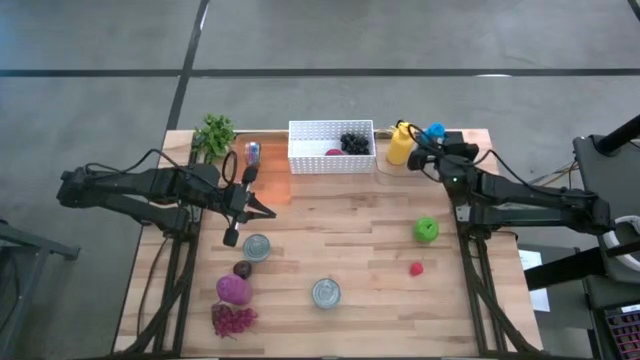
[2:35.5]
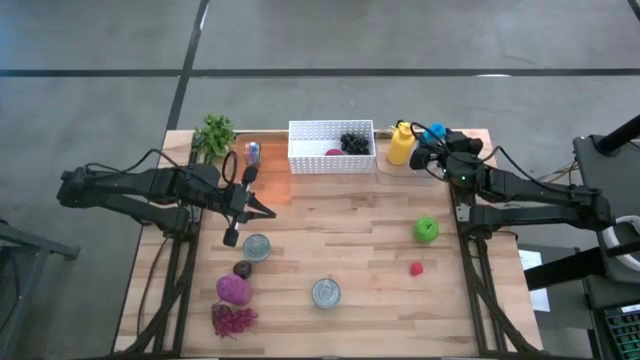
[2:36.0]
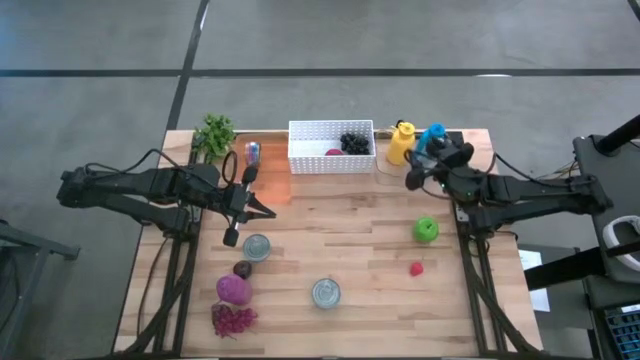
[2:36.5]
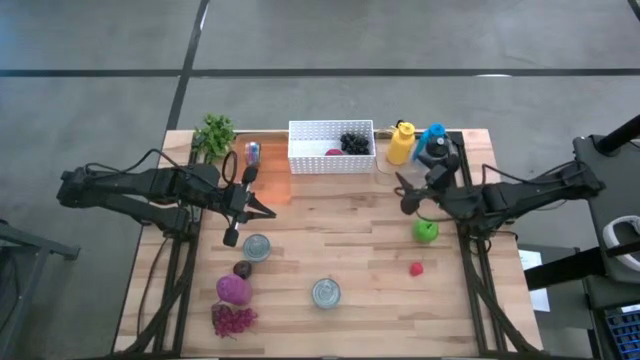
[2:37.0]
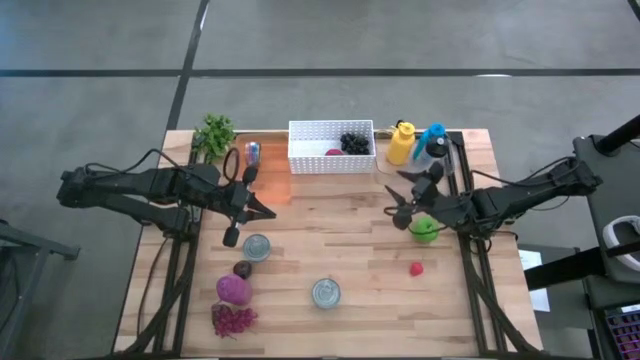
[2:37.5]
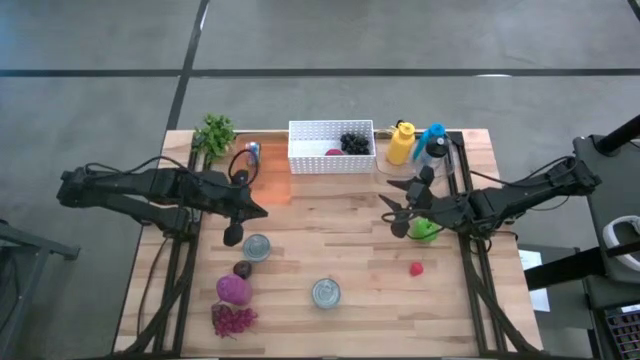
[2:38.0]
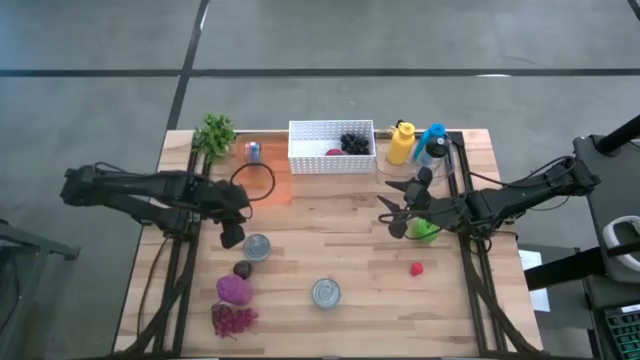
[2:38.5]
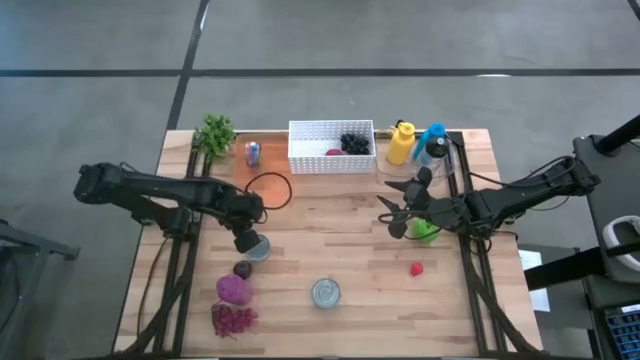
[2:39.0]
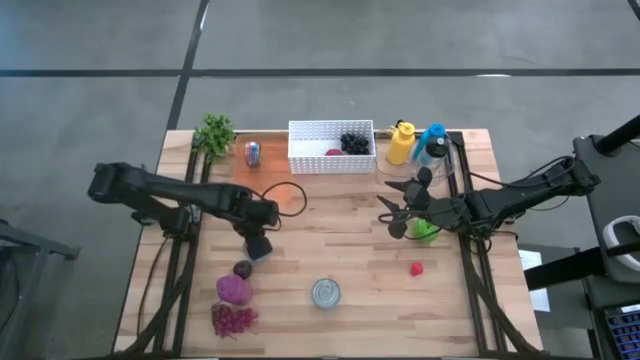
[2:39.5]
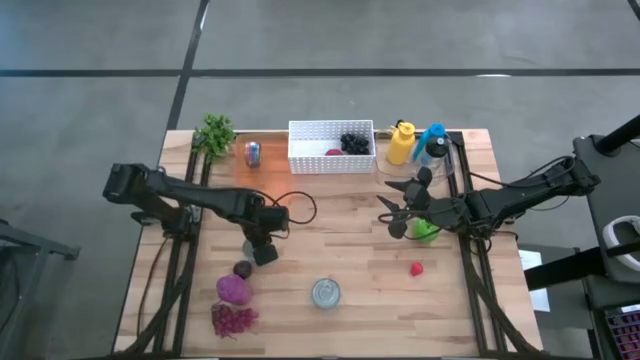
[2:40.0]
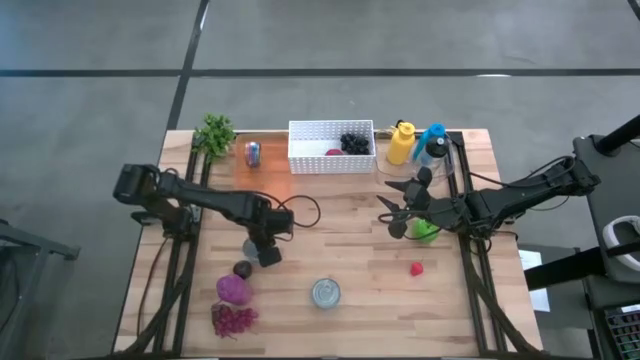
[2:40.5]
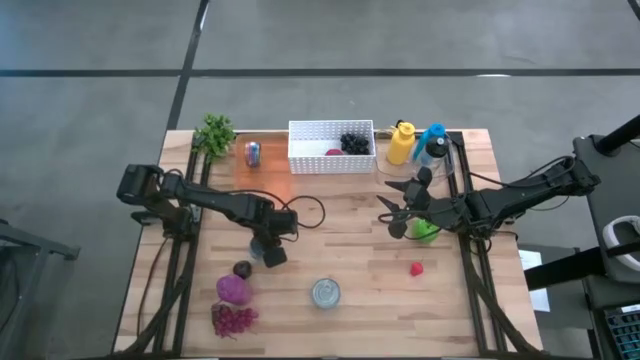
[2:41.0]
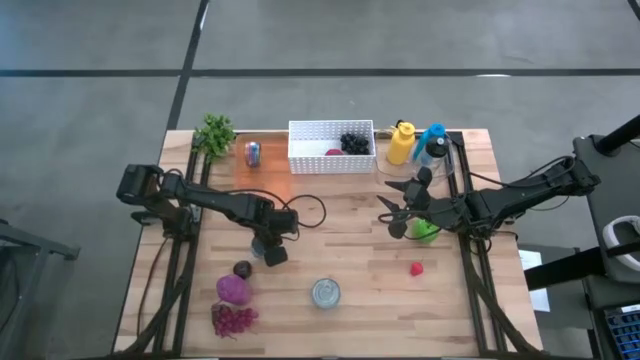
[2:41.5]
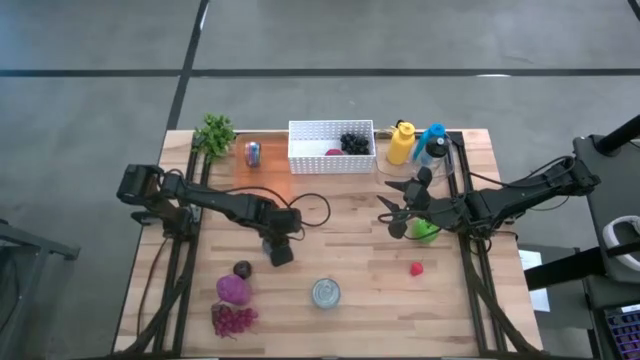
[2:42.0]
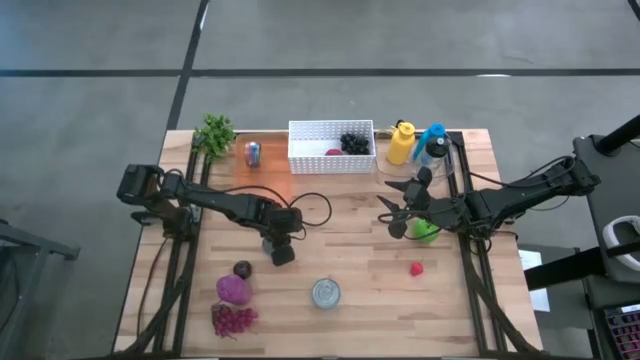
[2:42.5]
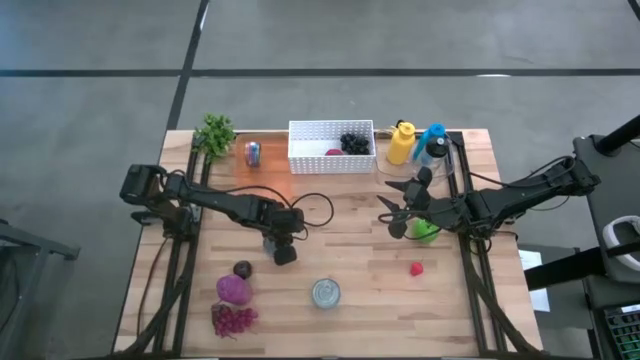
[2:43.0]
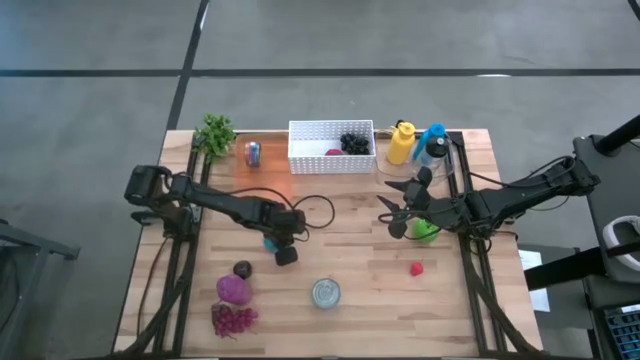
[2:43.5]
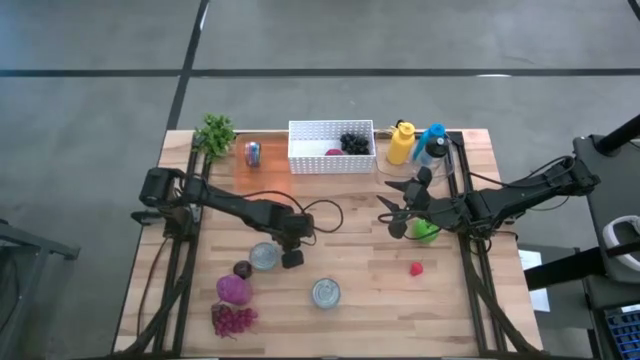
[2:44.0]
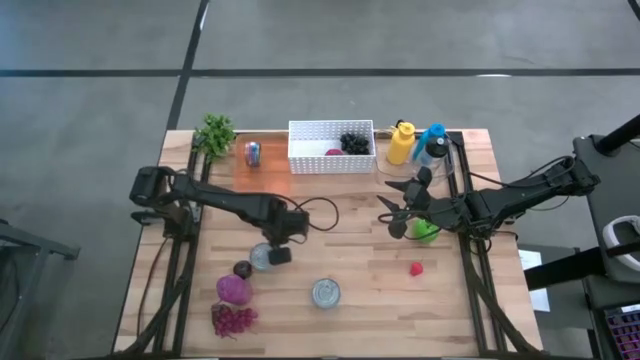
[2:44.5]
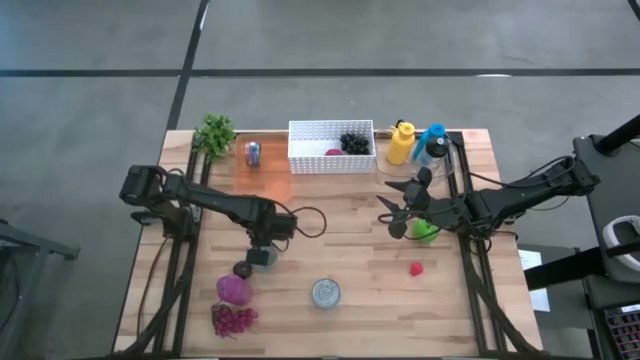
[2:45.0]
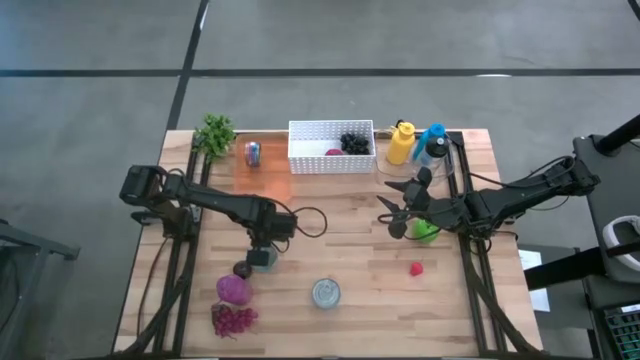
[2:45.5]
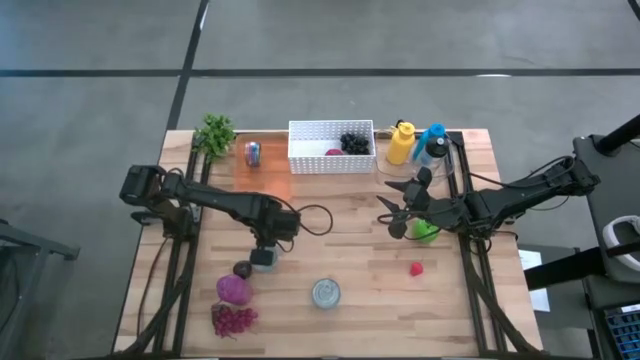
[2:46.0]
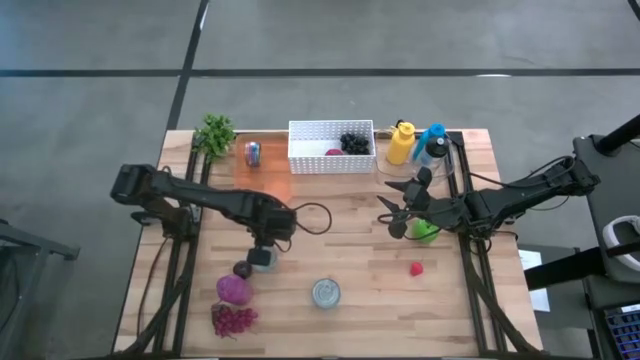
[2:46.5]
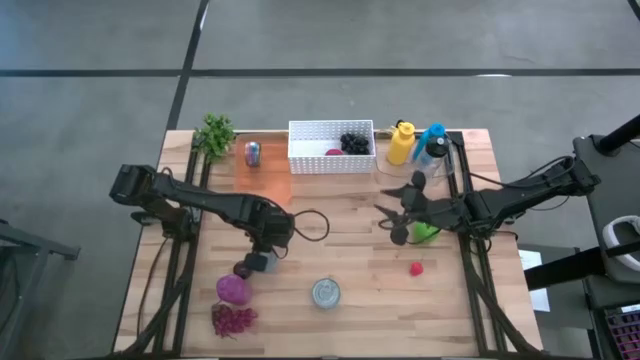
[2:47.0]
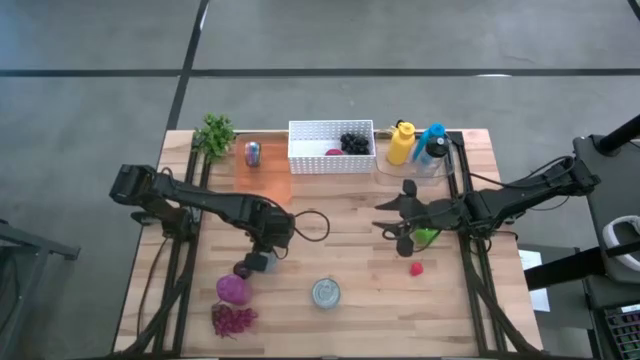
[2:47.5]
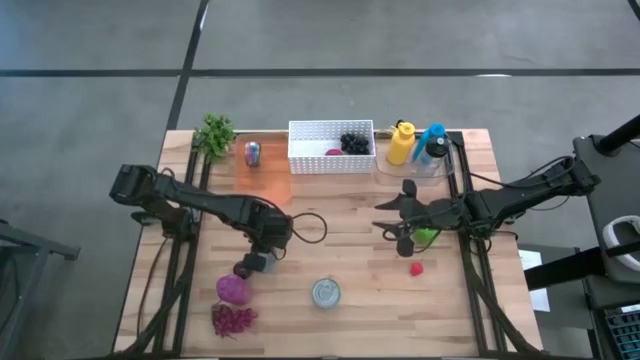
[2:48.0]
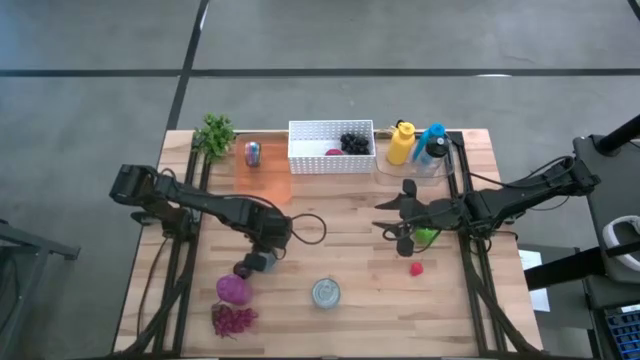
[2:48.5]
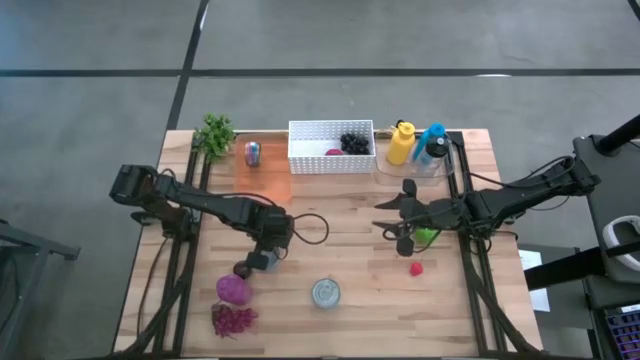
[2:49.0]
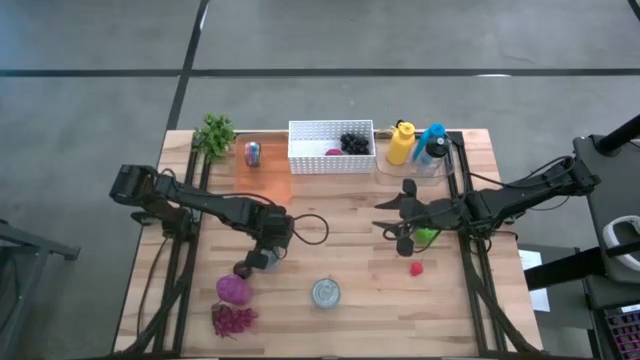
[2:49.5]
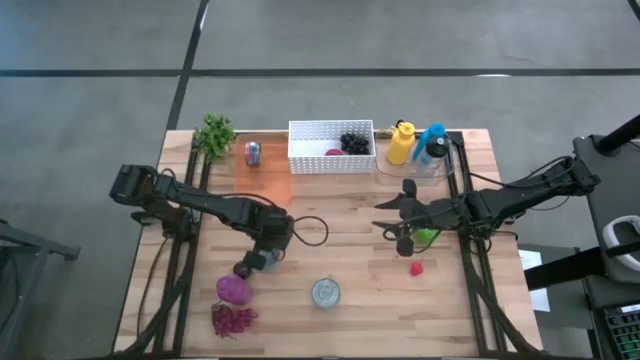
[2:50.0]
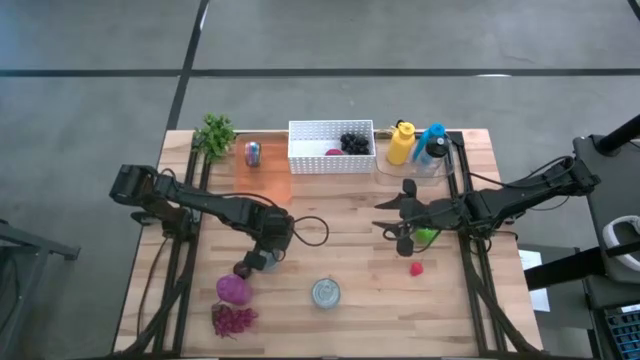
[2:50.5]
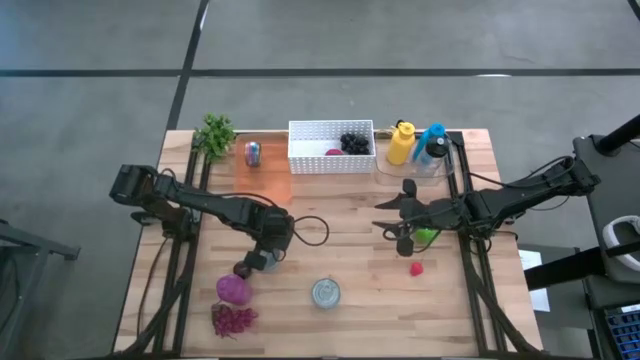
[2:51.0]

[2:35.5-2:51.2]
Task: Pick & Place Food Item
Put the yellow-blue tuna can into the orange bin

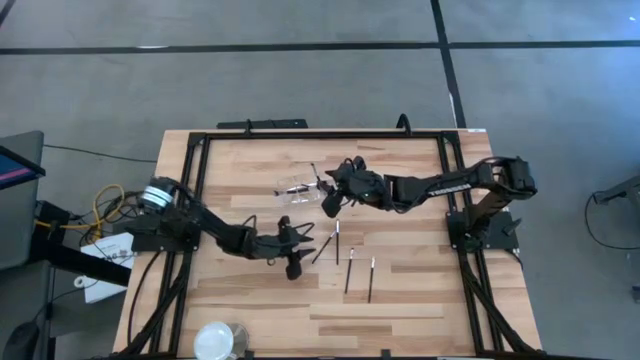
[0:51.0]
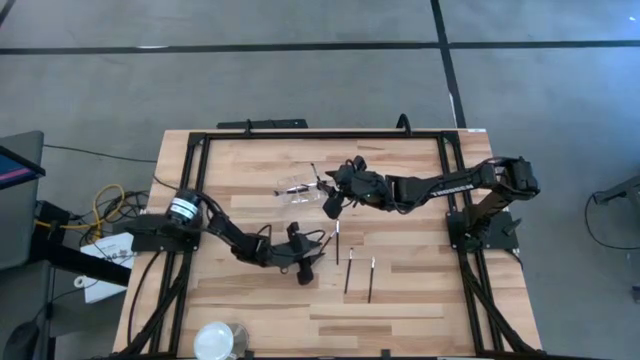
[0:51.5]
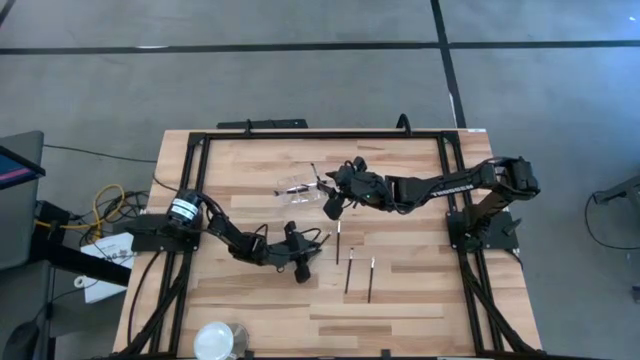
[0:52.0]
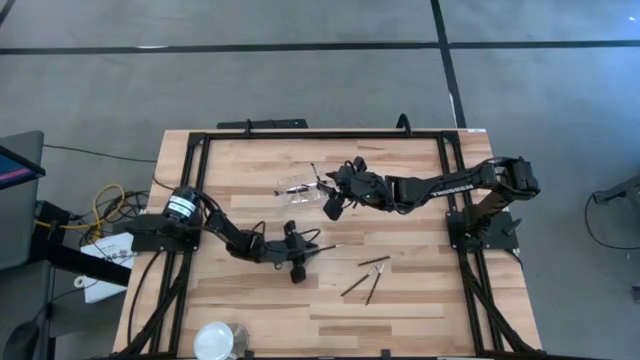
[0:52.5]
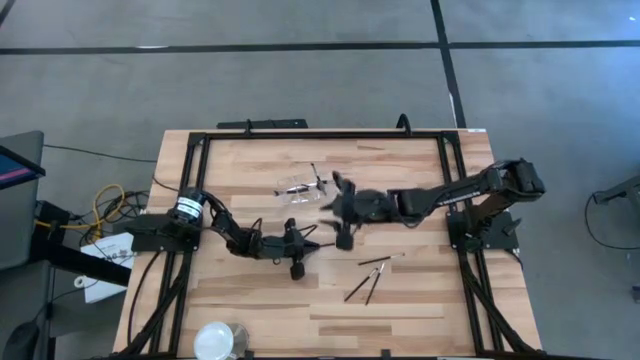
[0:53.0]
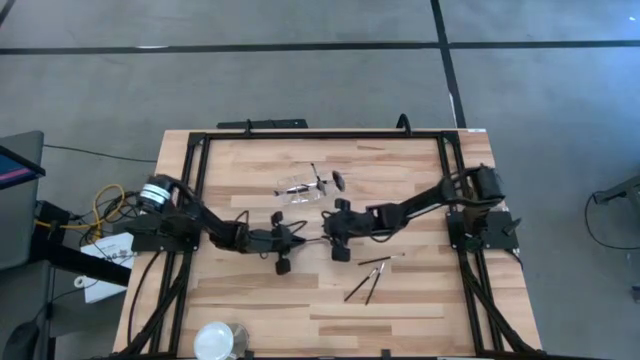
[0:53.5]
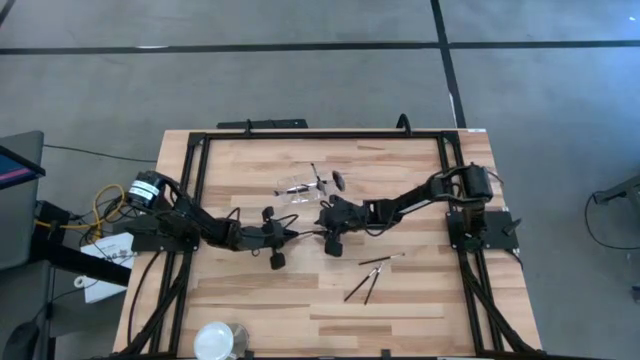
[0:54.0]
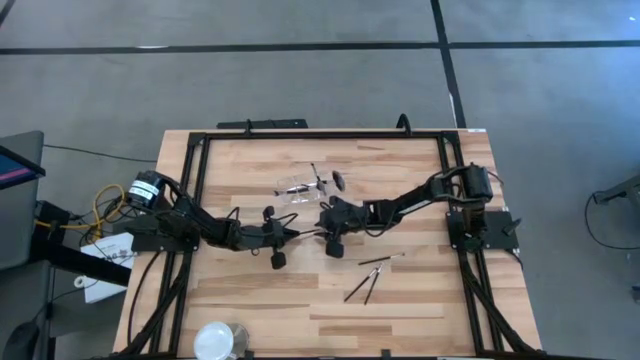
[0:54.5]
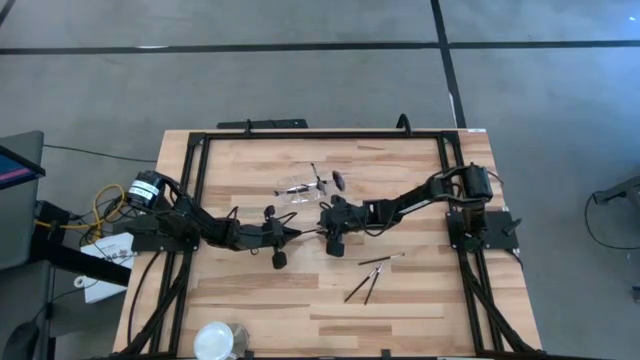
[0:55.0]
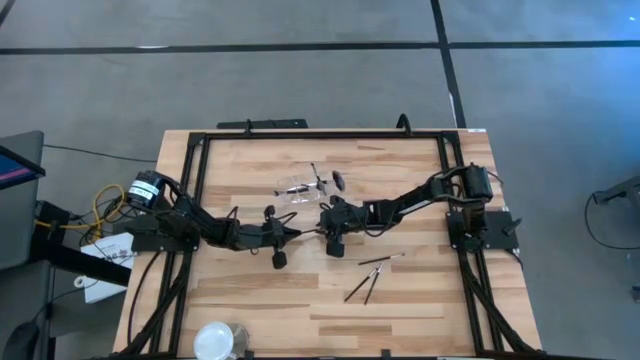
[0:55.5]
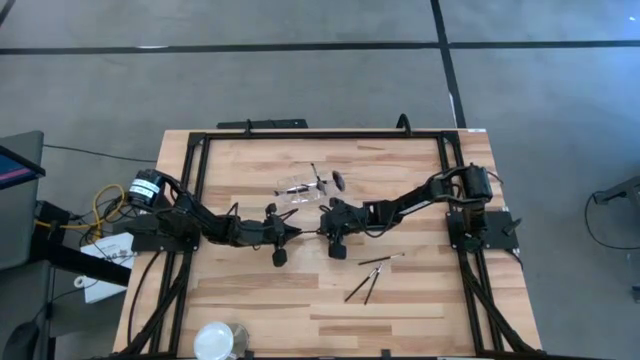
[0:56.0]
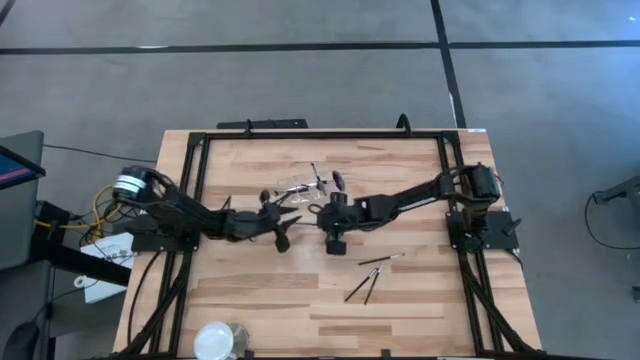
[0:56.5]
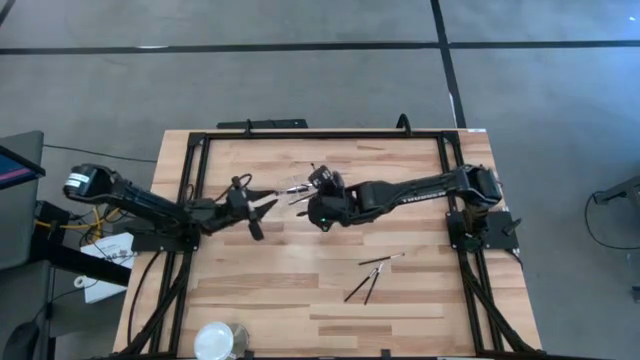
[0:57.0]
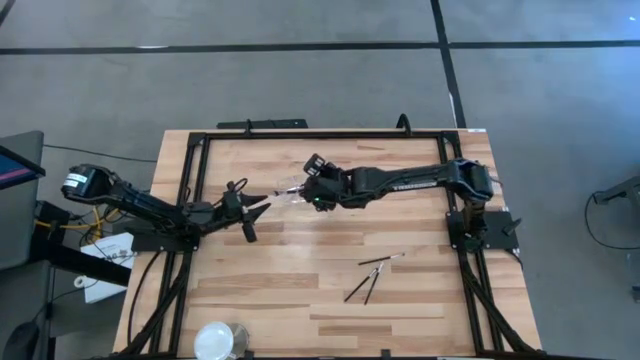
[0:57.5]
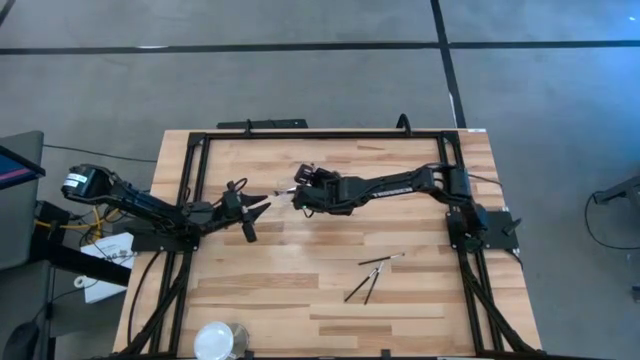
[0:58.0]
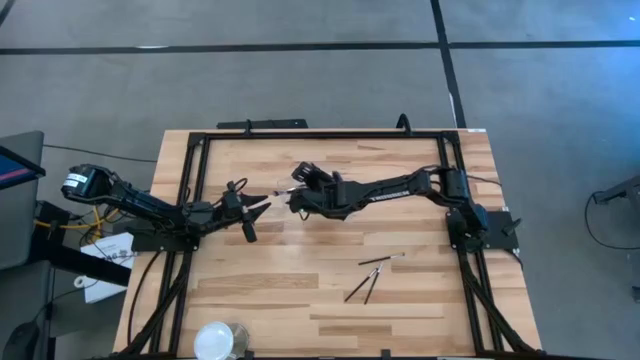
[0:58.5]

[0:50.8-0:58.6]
Task: Put items in baskets/containers
Put the black liner brush into the transparent organizer
